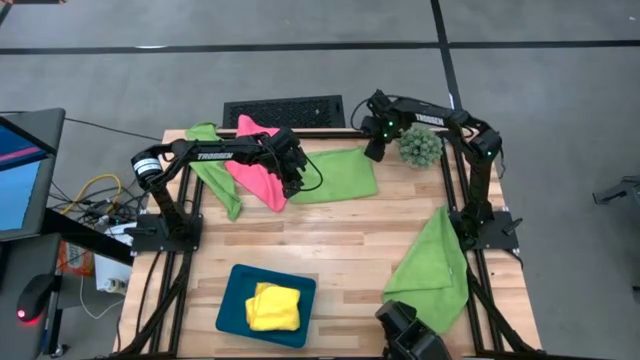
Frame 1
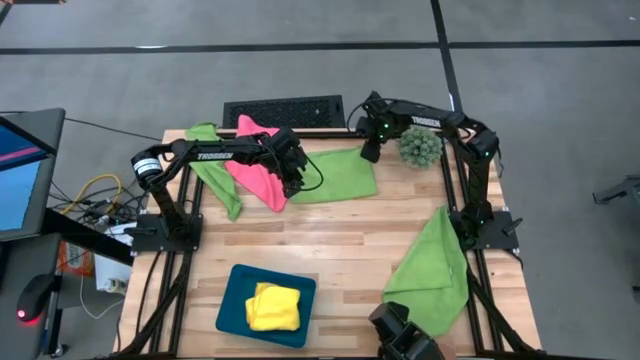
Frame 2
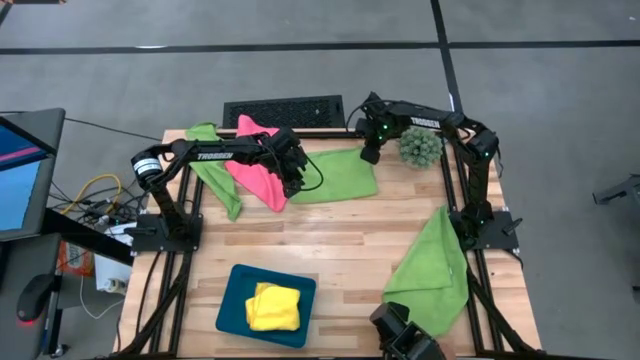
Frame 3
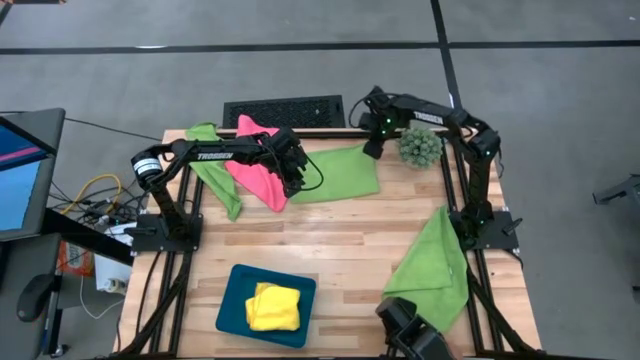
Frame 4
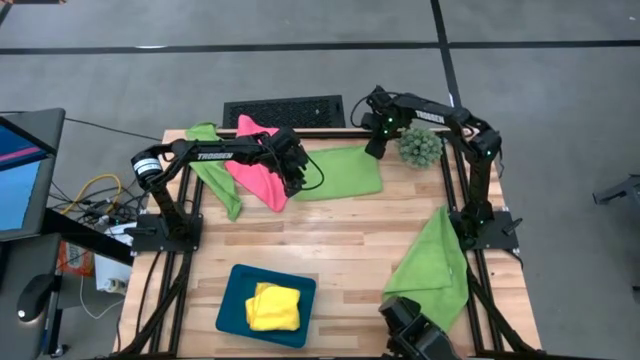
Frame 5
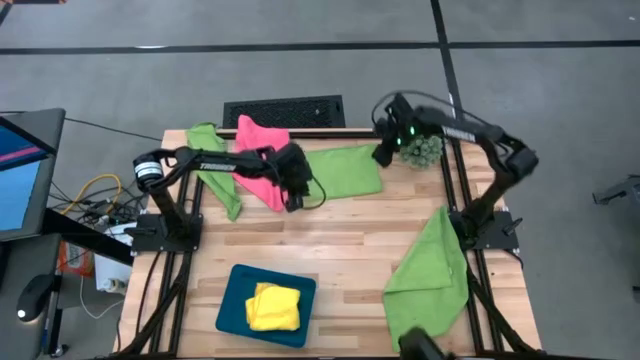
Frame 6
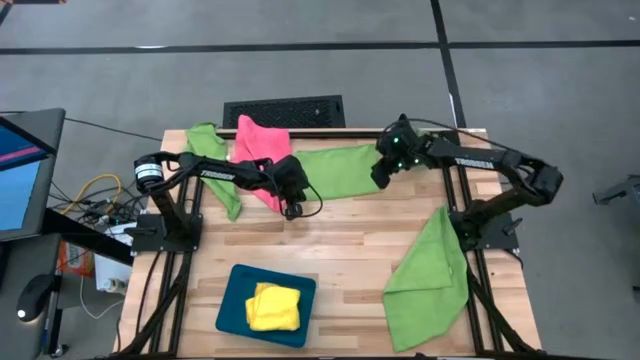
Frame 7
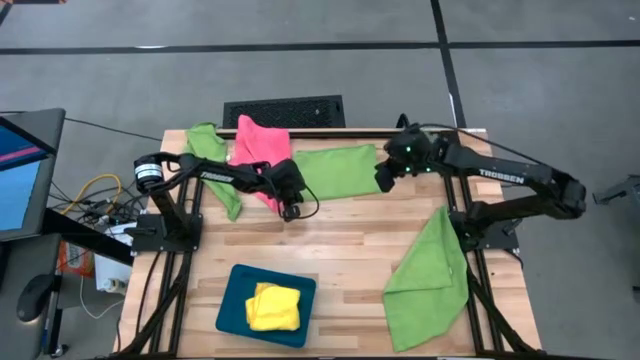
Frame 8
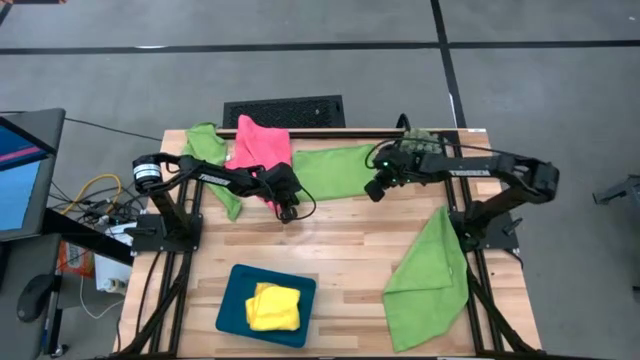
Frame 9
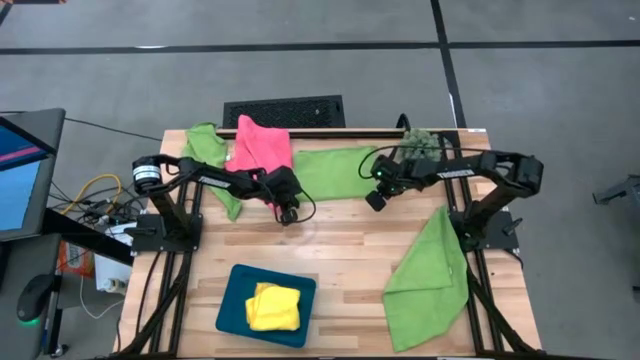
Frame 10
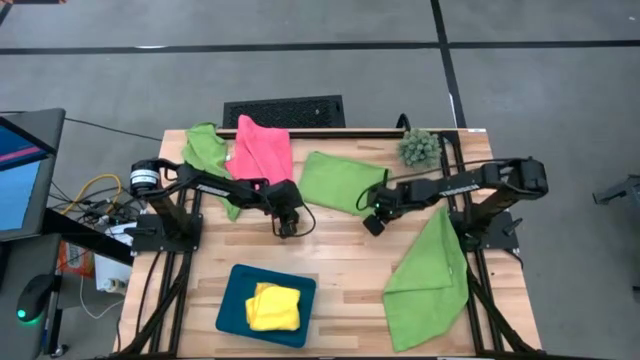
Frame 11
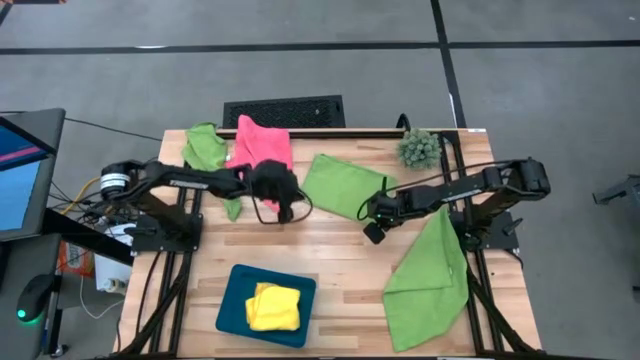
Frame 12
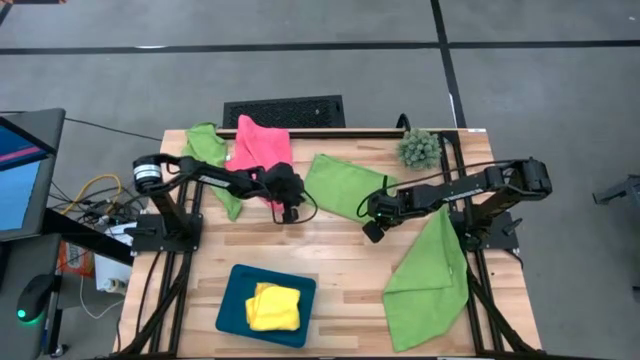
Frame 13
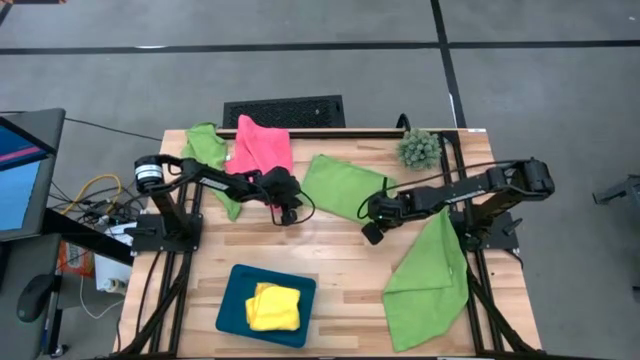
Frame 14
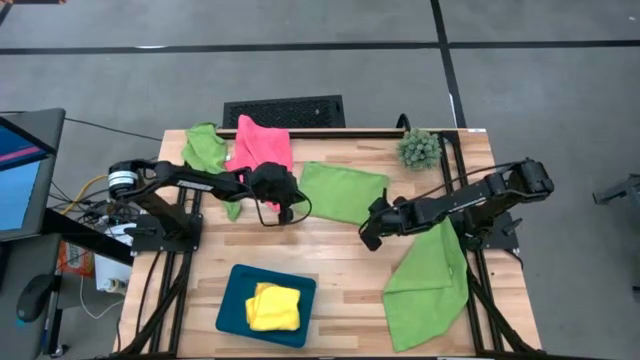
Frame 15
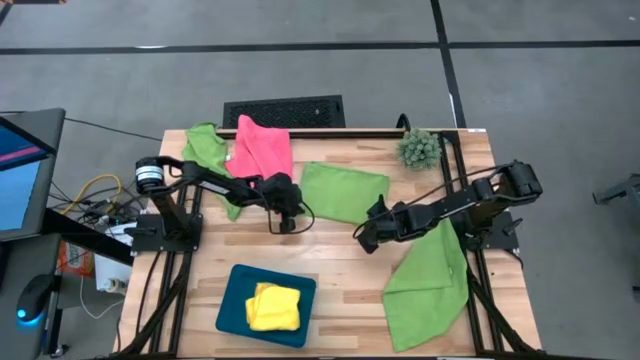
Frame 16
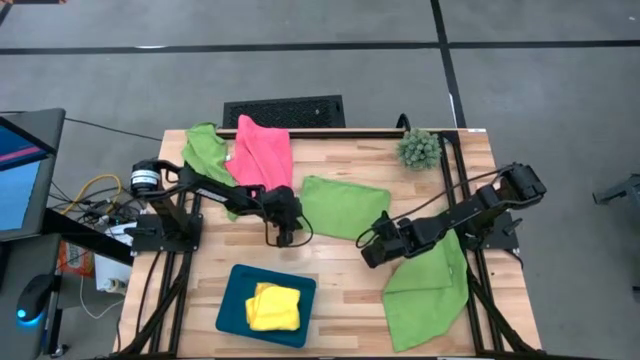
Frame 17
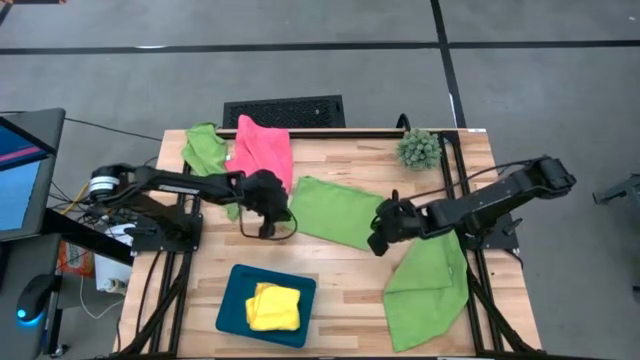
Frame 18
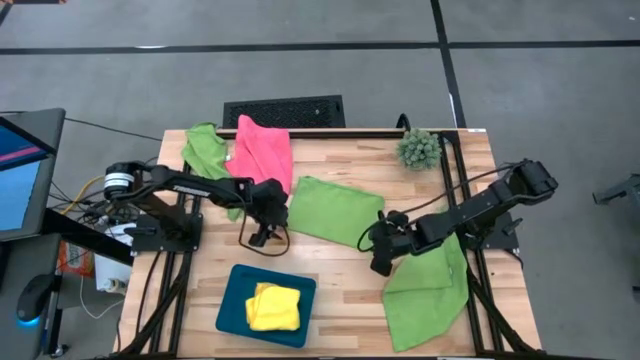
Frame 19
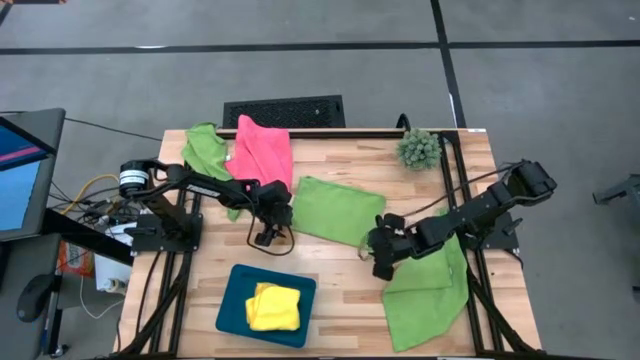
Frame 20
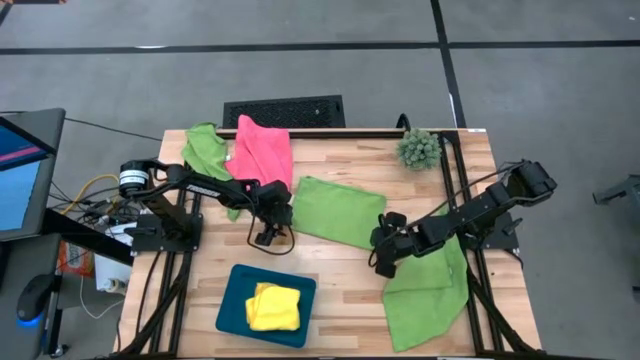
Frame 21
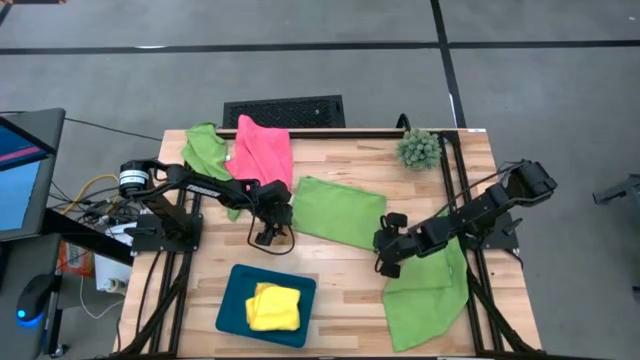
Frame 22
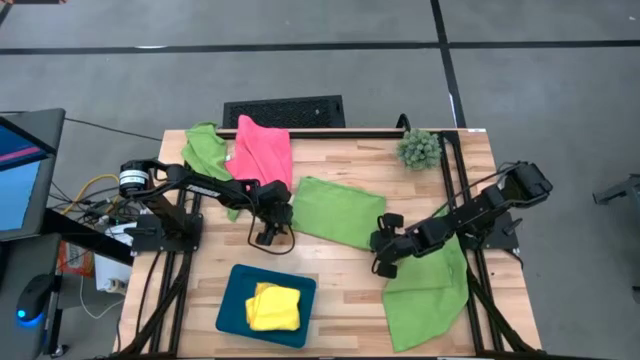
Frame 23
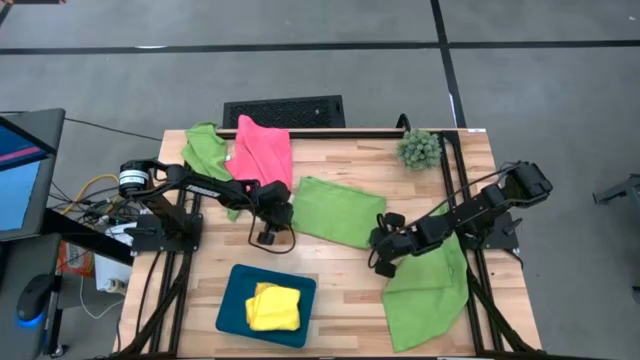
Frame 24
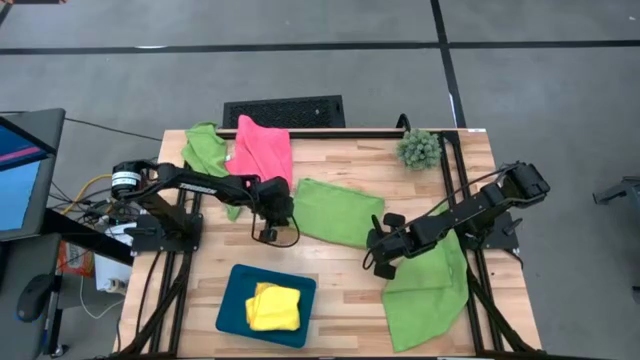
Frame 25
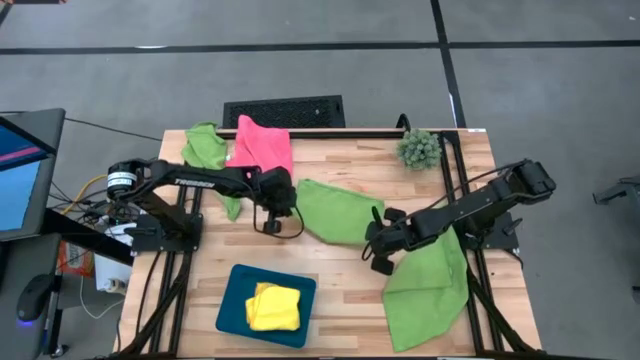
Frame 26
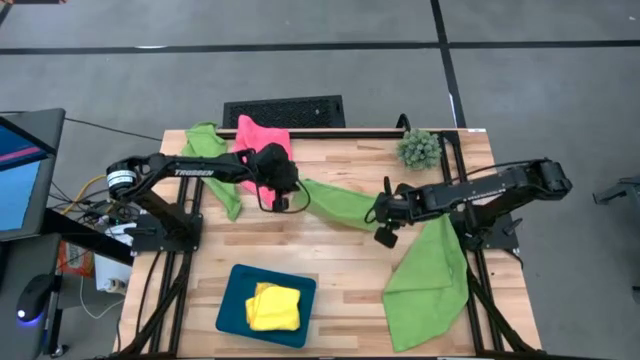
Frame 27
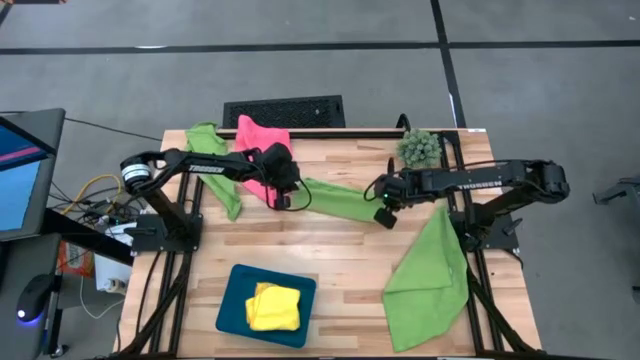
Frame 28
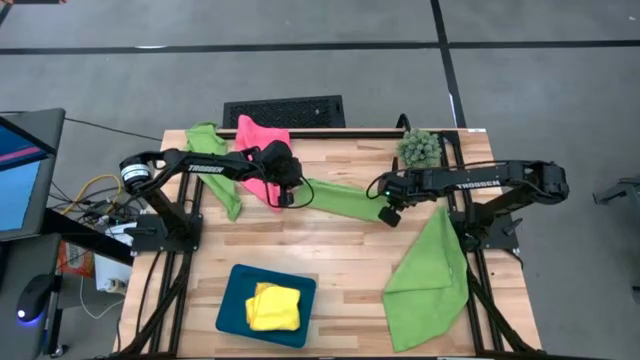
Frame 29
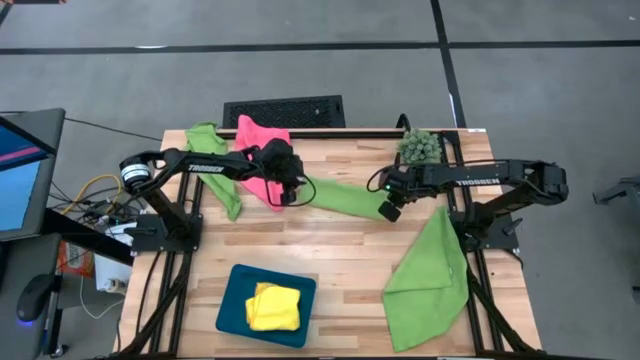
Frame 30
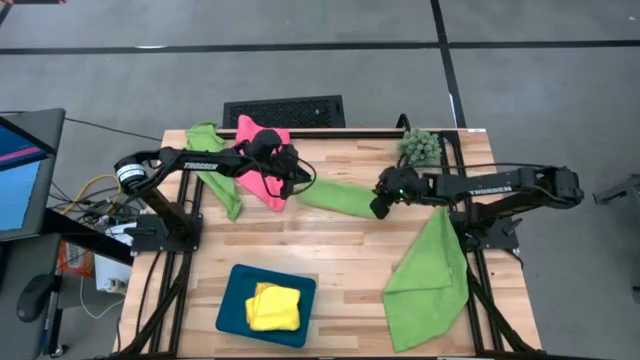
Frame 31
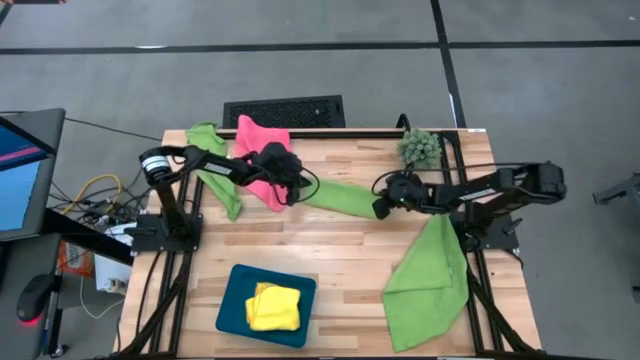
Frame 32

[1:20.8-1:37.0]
Task: Fold microfiber towels
Fold the top right green microfiber towel

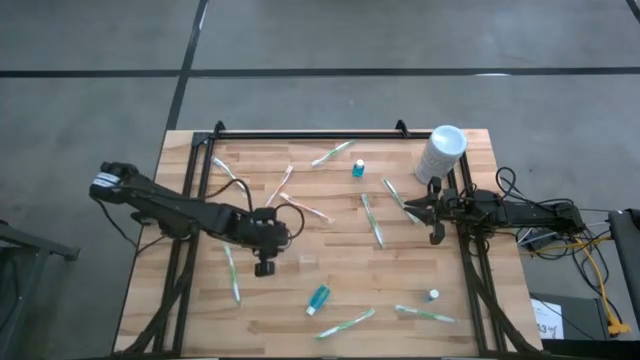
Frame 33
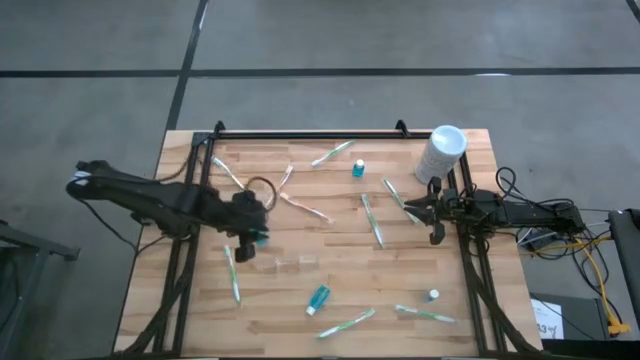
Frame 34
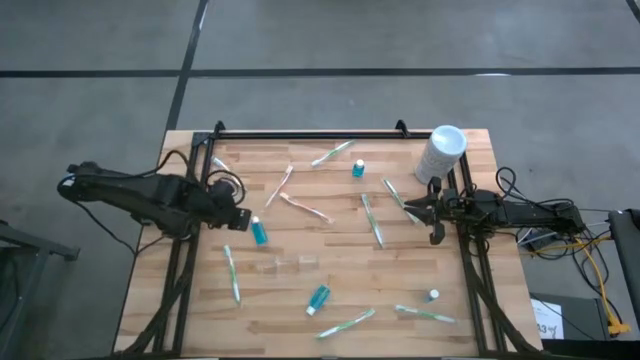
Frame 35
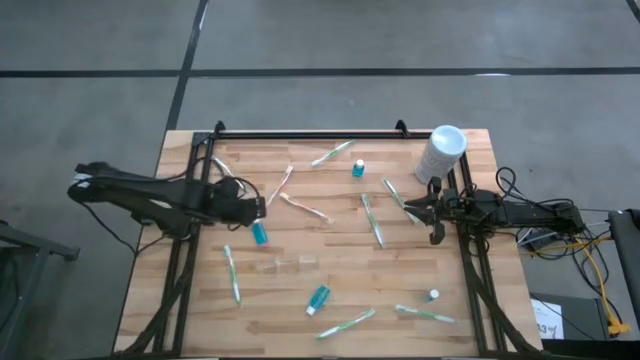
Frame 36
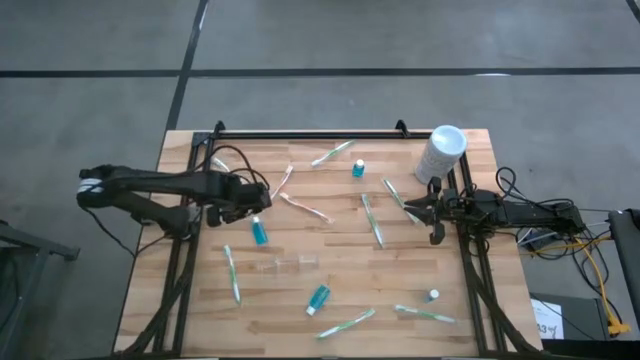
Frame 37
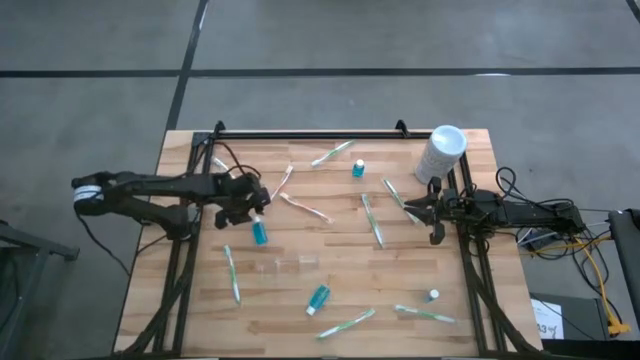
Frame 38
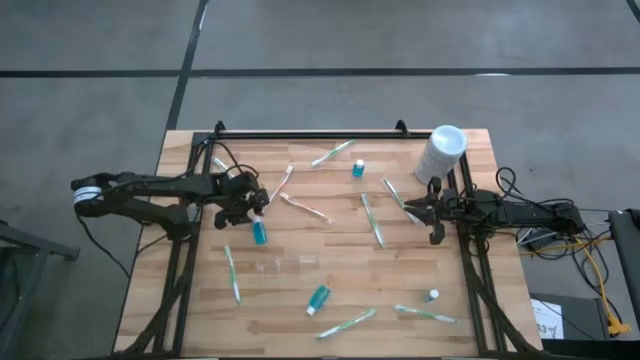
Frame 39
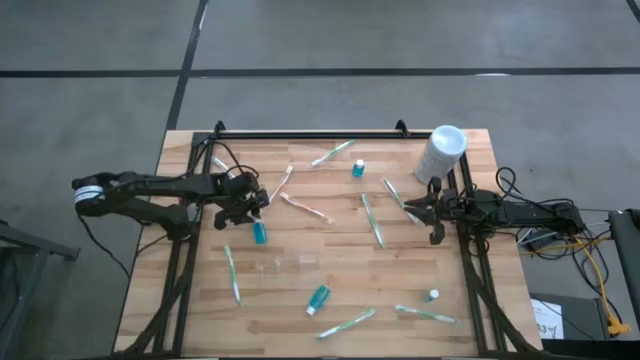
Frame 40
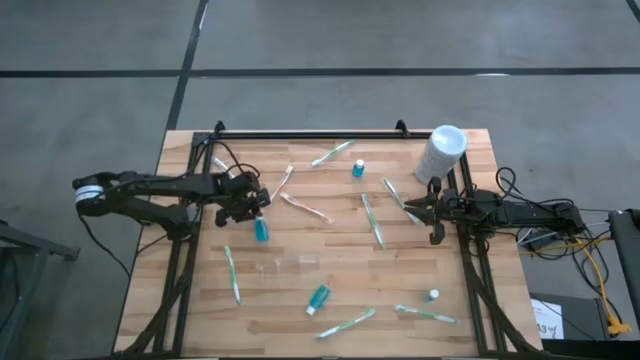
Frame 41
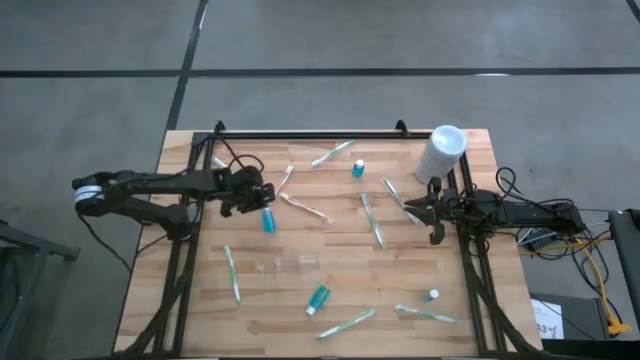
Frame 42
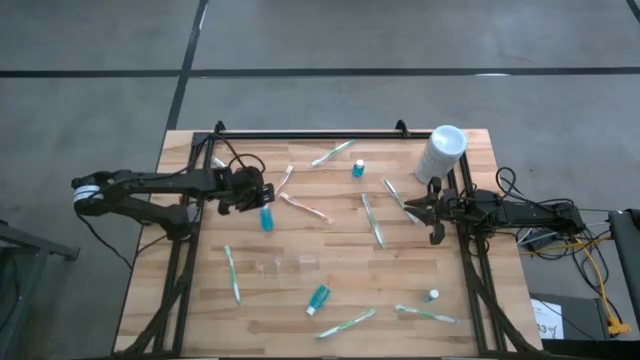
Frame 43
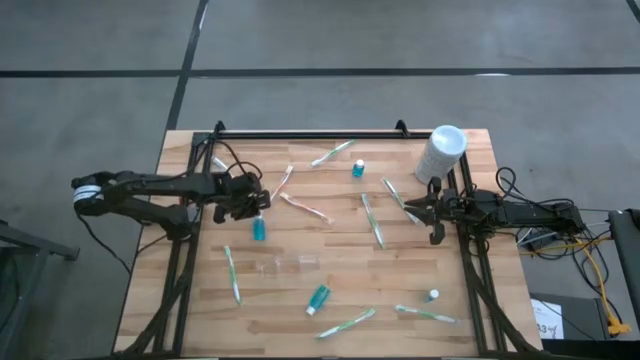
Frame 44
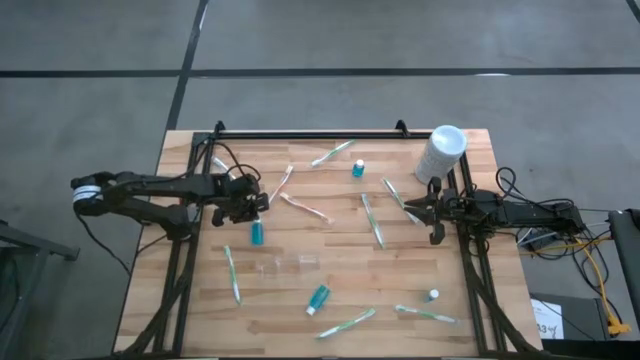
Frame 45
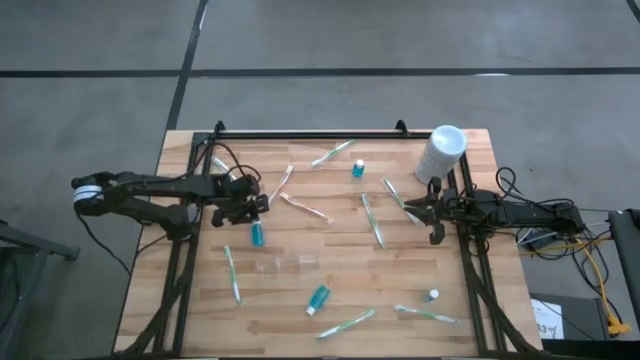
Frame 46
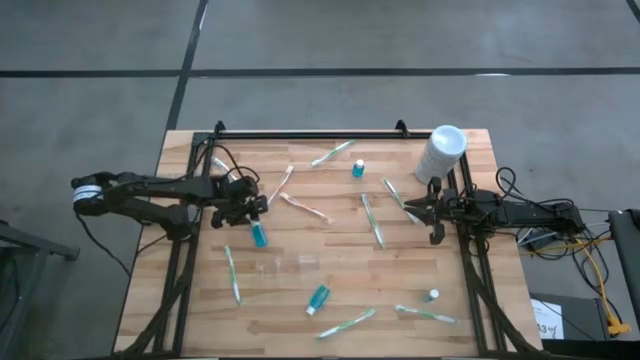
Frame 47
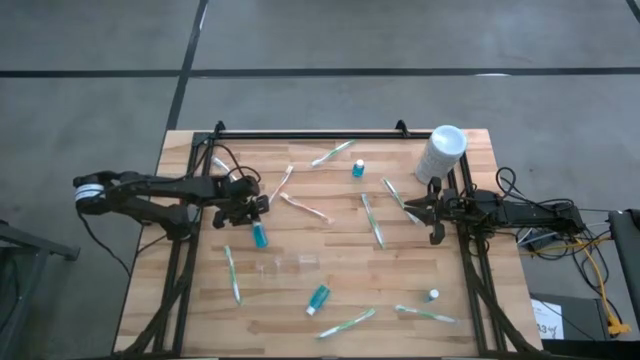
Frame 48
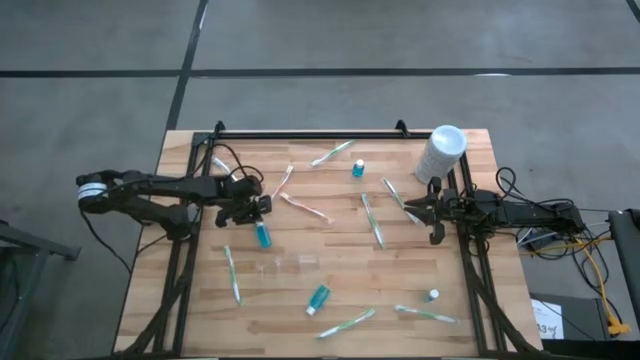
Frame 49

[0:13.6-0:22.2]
Task: Pick & Place toothbrushing station
Put the blue mouthwash into the transparent organizer
